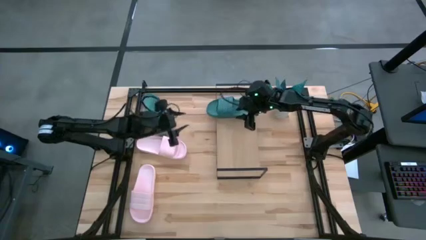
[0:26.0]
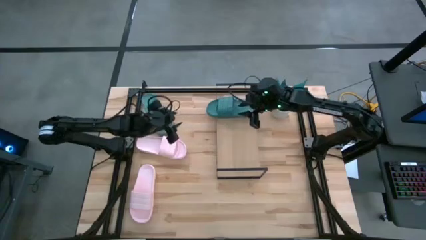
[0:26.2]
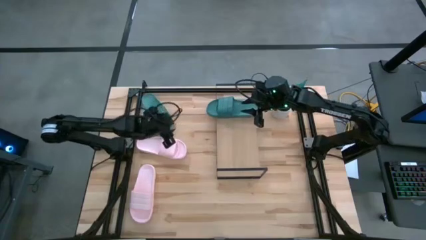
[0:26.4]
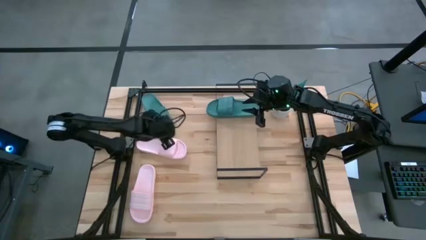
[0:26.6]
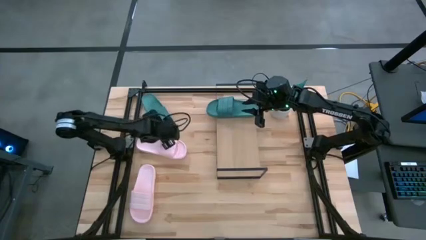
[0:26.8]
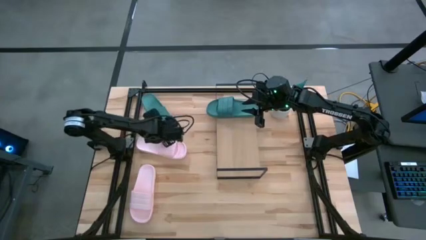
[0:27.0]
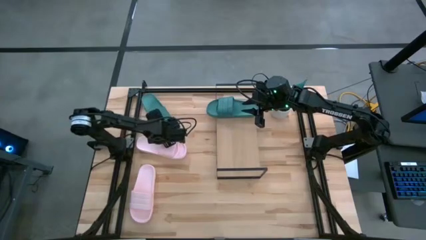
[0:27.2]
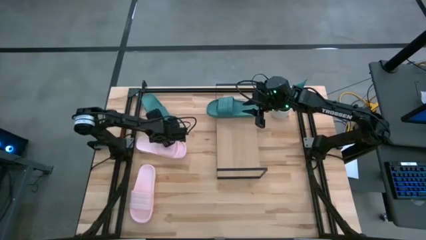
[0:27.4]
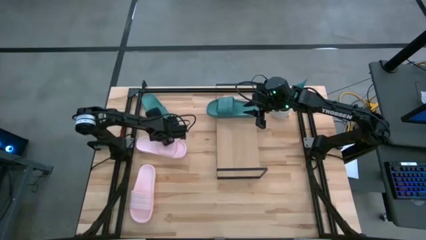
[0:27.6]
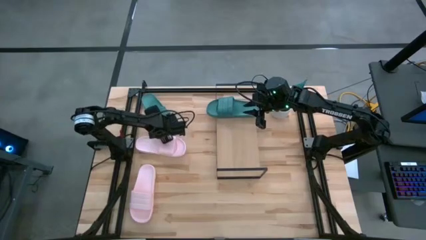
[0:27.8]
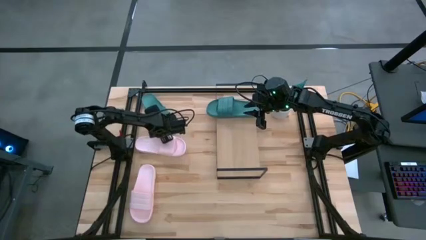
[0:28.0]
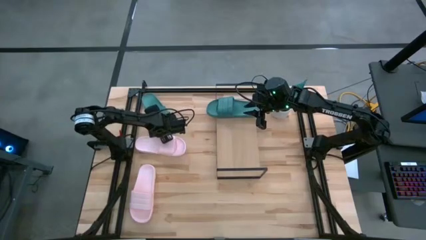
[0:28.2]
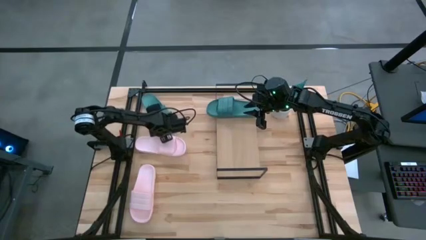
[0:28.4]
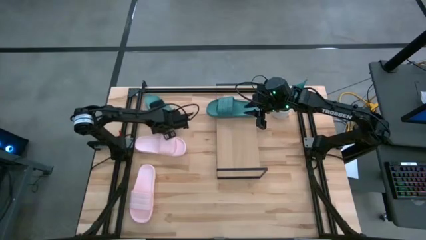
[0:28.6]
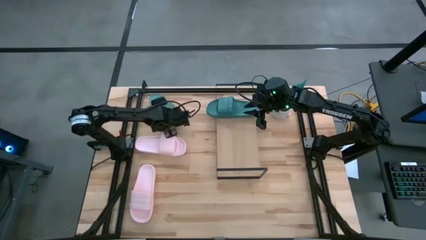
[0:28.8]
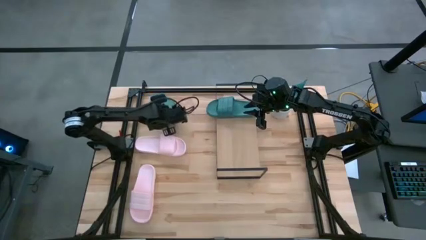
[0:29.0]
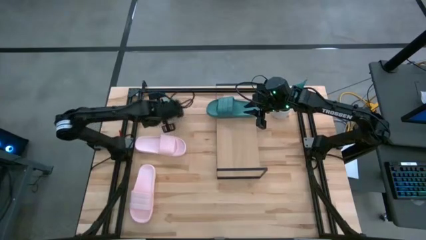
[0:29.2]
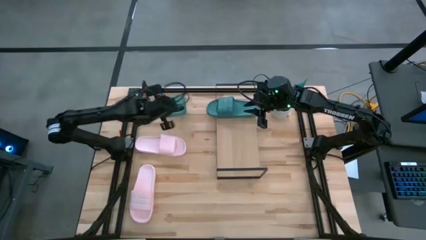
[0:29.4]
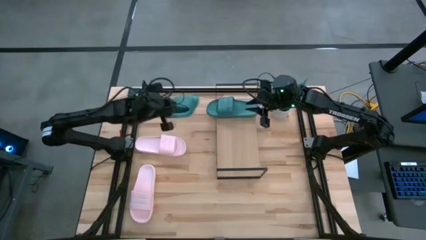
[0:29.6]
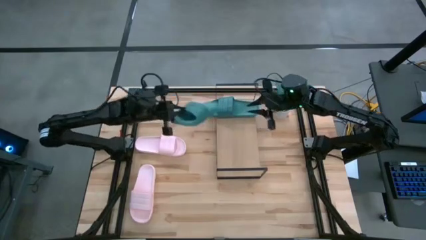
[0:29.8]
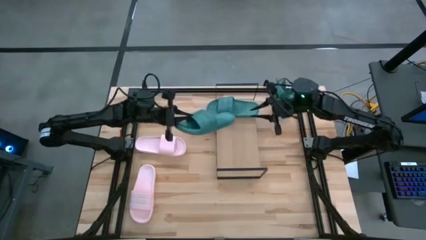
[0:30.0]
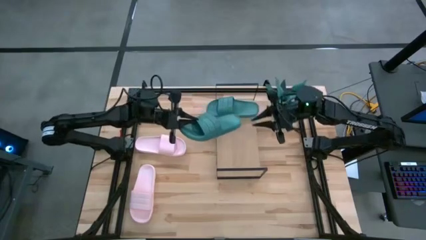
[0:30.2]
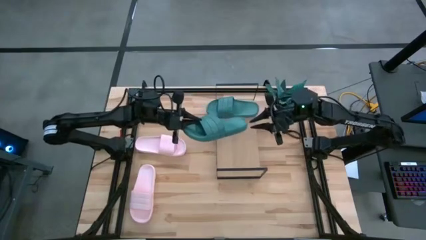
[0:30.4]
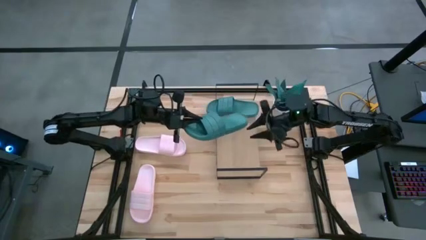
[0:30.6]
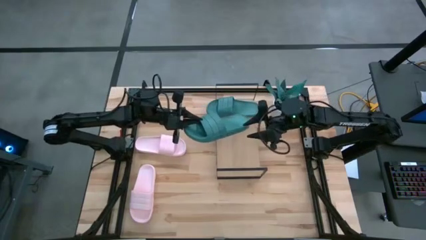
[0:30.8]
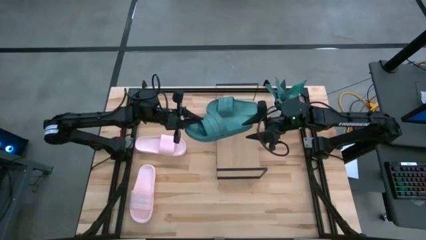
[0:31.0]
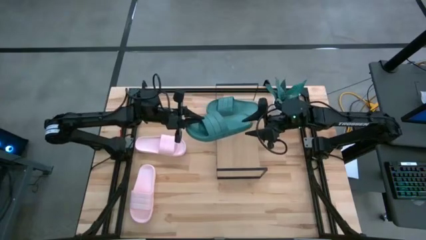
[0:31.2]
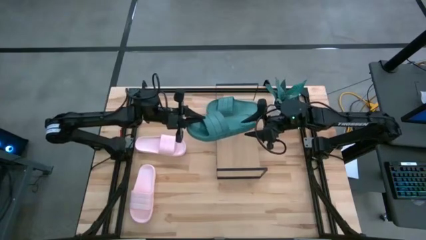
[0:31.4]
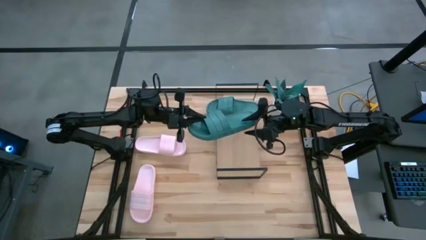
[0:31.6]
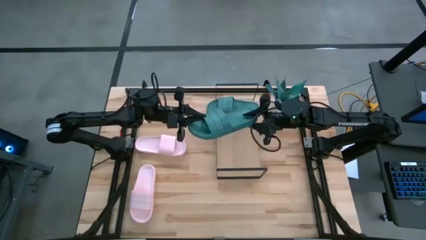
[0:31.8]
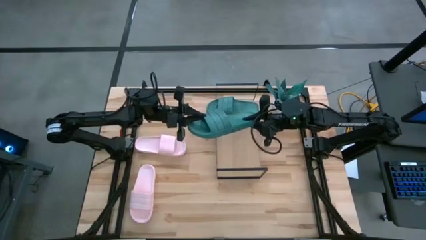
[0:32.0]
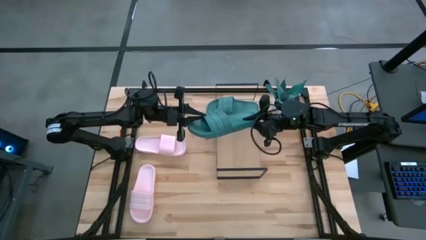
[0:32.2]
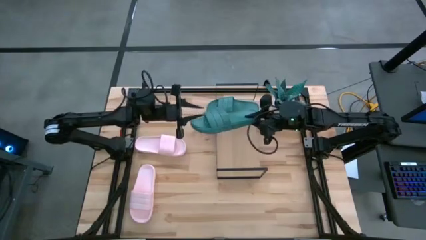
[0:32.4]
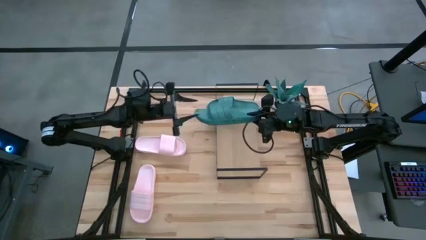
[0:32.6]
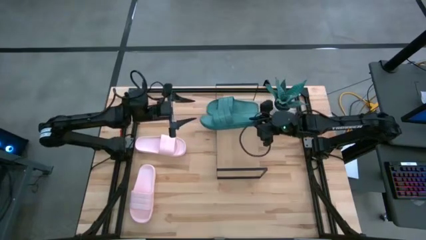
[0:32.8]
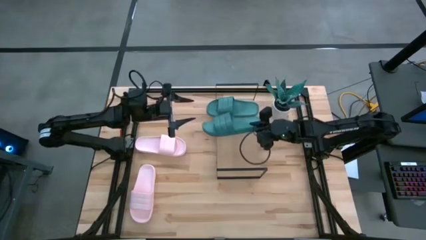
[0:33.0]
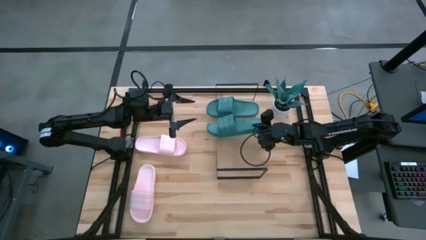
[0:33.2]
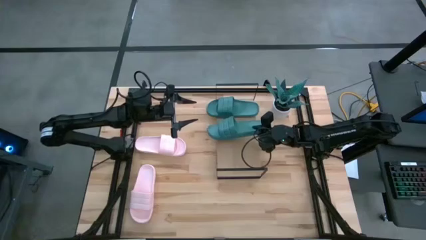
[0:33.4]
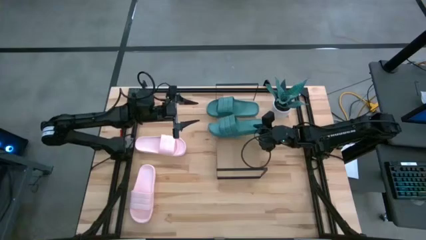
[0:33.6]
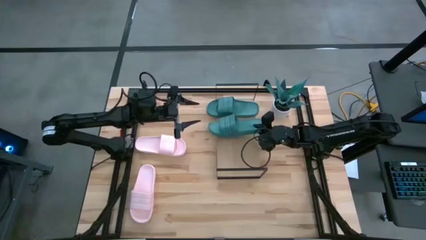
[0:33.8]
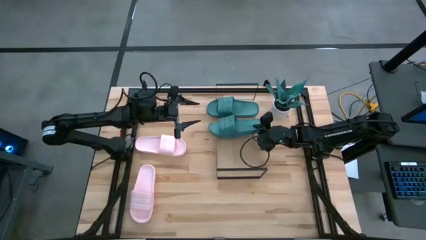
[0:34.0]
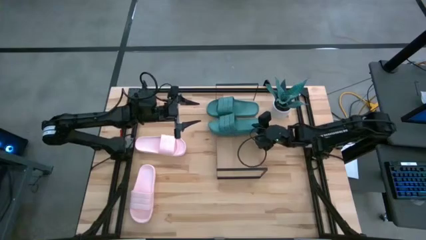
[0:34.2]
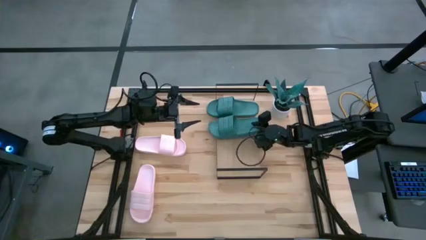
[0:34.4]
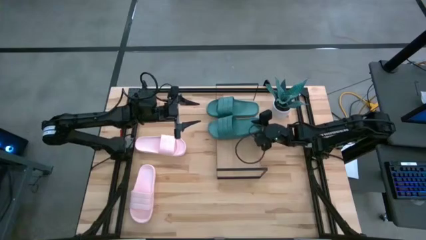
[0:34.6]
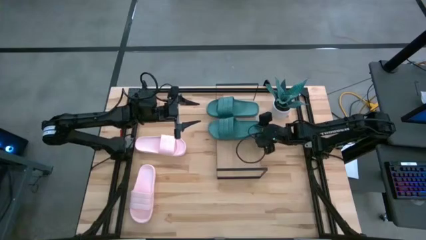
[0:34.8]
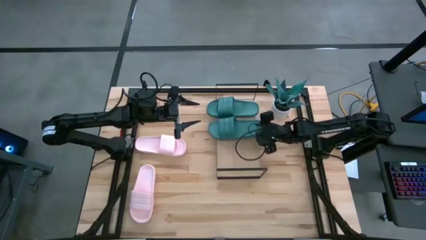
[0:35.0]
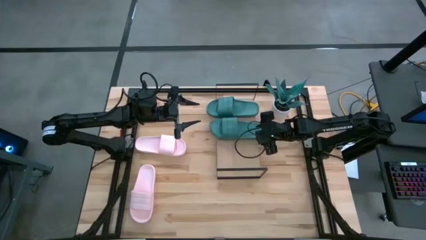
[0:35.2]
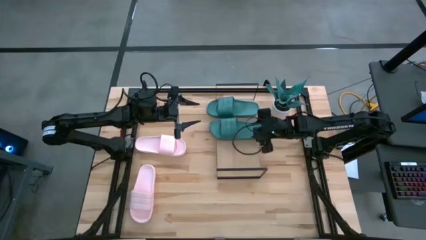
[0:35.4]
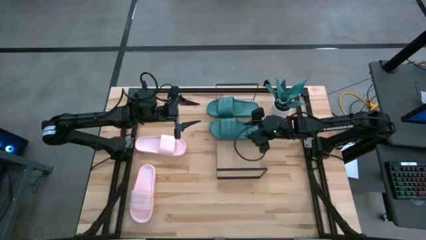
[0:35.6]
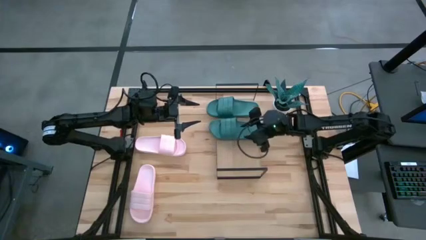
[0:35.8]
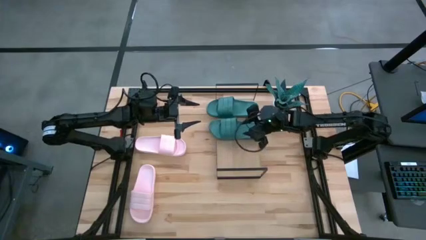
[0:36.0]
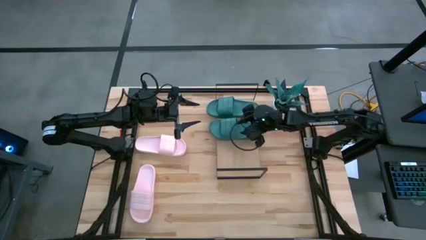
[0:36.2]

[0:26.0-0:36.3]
Task: Pick and place slides into the shelf
Put the blue slide on the shelf

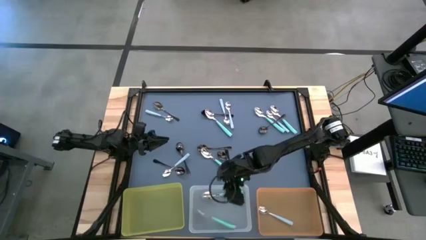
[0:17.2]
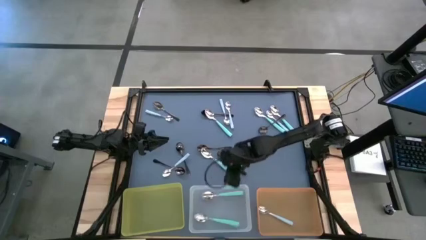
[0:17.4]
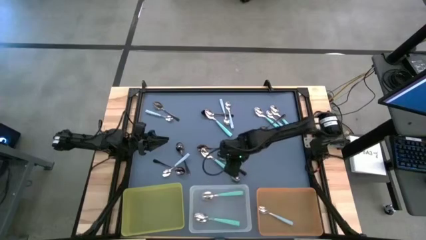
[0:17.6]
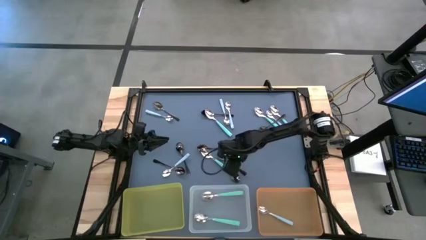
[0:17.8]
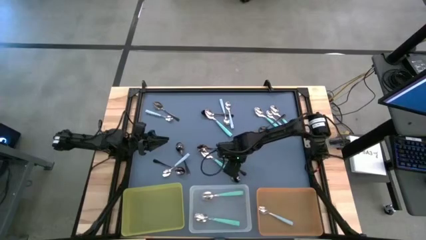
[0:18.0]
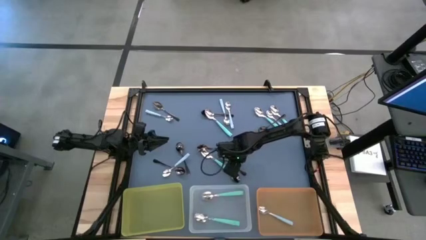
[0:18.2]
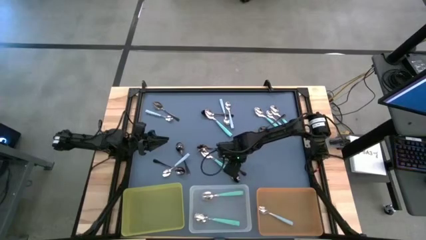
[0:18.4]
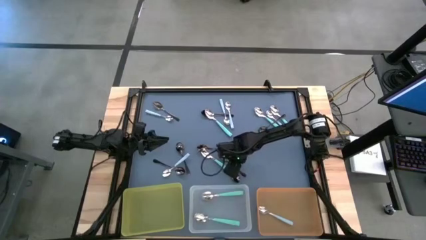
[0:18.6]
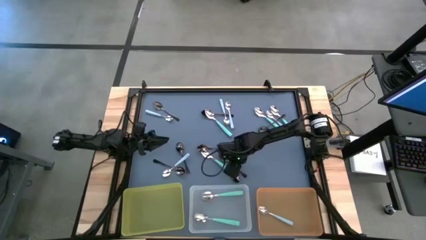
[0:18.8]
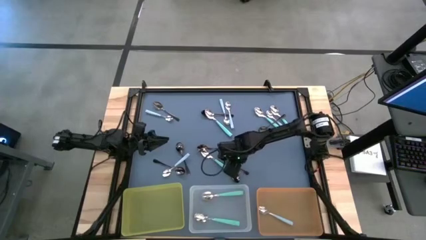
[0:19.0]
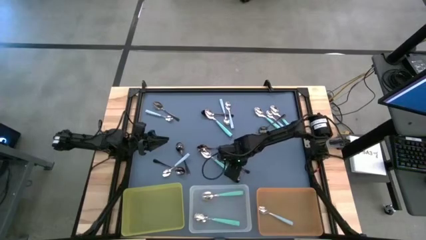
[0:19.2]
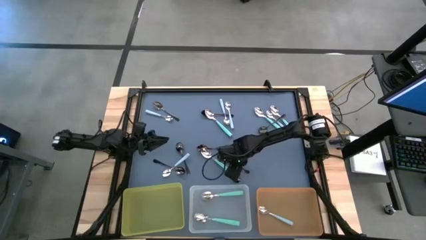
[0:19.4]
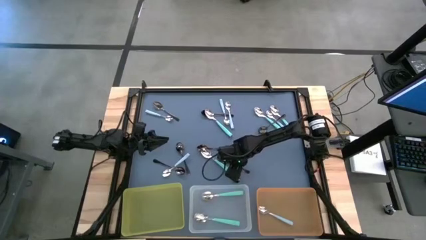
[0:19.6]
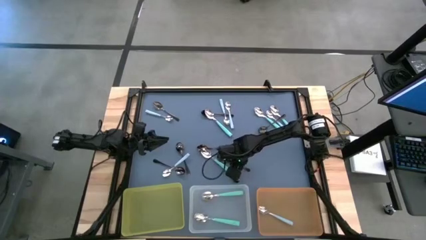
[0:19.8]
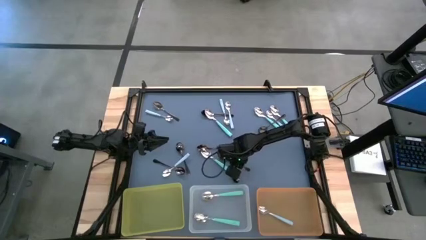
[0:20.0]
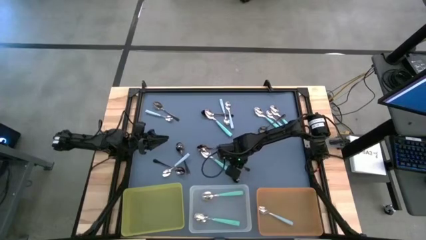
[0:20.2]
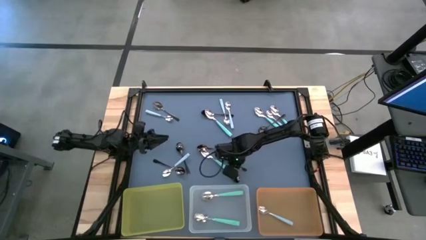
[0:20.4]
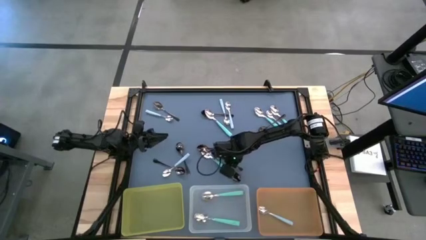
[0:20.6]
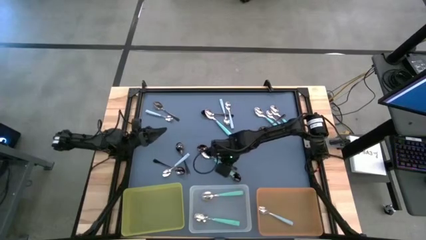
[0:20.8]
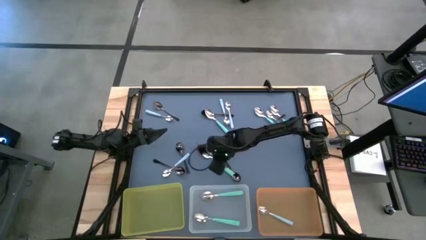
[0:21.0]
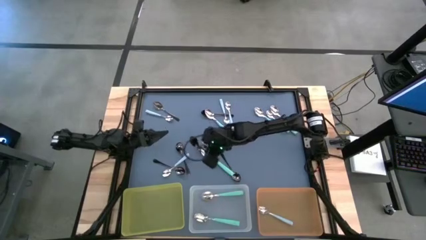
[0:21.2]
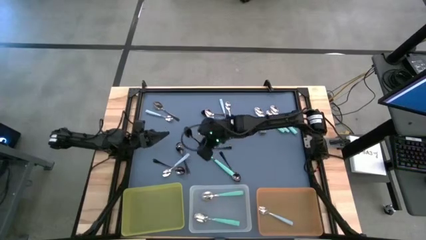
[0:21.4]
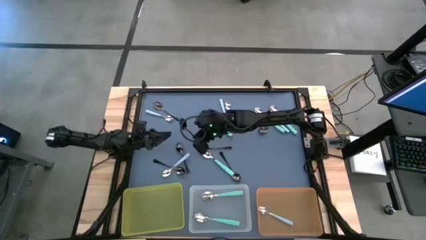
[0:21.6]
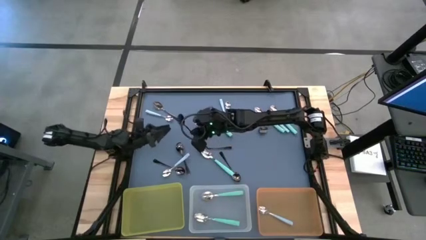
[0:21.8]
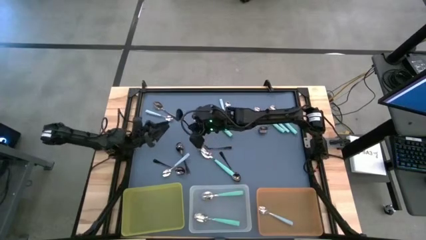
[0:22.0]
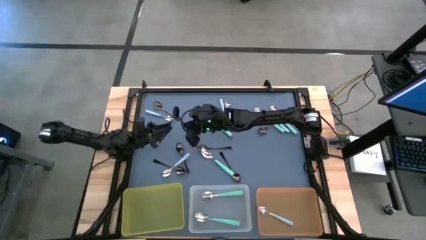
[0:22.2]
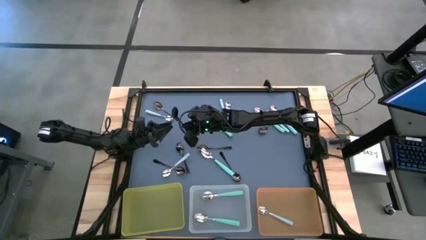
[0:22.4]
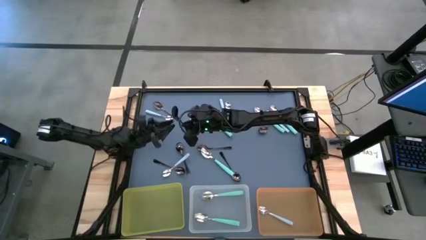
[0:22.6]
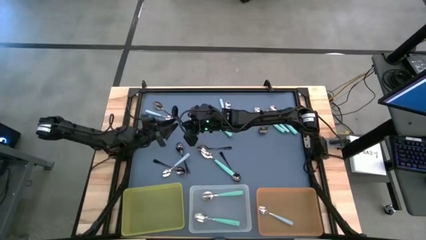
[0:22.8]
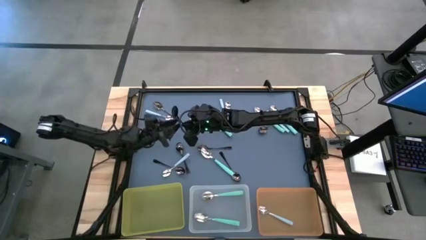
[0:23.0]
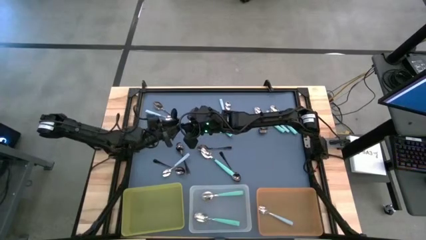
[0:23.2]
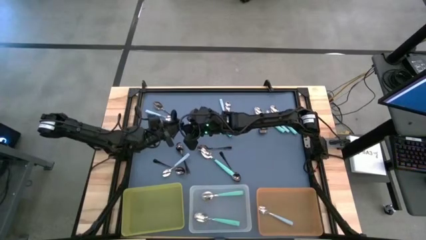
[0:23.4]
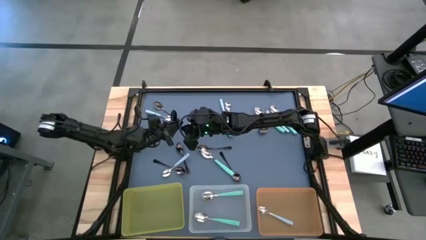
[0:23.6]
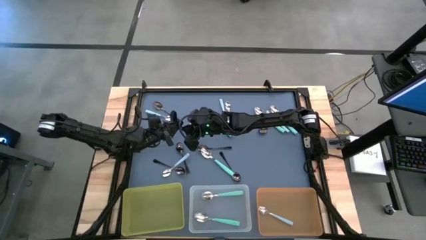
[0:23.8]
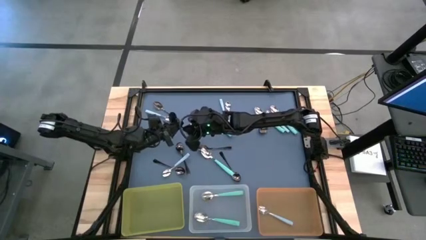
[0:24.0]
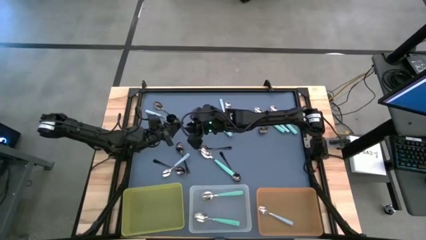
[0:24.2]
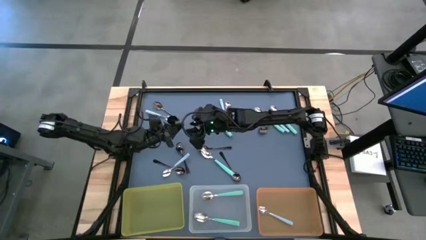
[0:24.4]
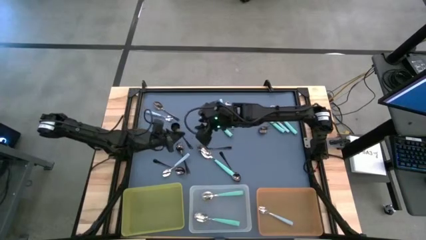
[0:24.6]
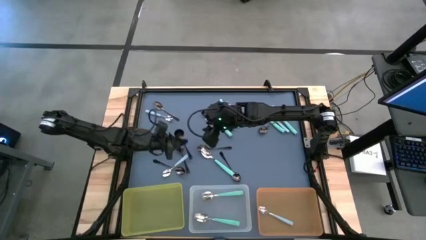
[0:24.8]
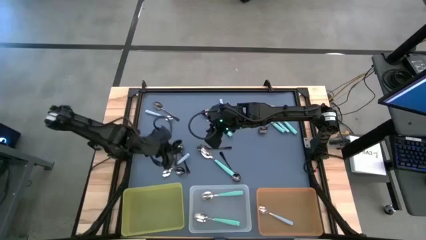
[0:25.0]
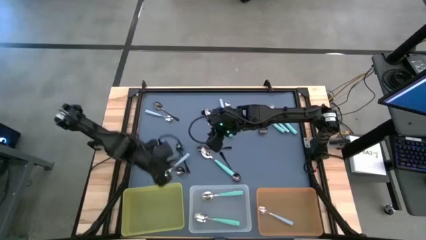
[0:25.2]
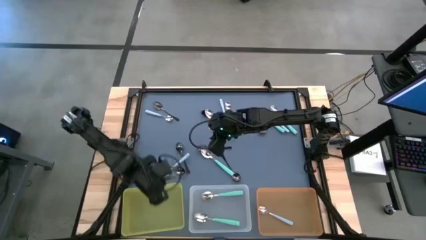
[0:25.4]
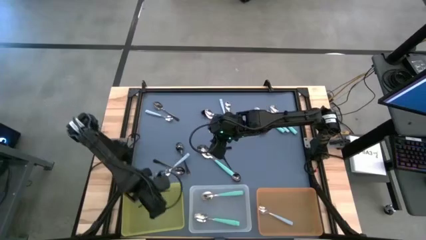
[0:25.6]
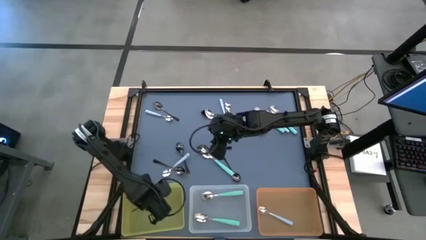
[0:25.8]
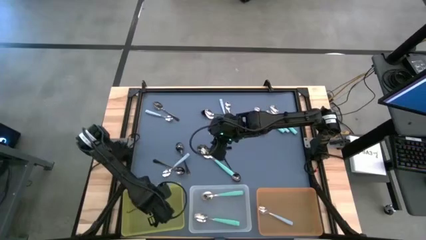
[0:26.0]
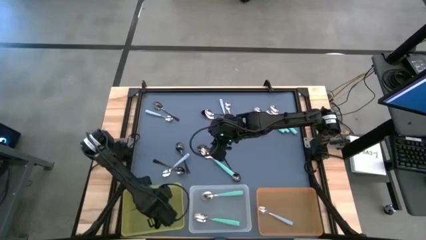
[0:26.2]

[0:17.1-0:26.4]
Task: Sort silverware by color (type)
Put the black spoon into the yellow bin
